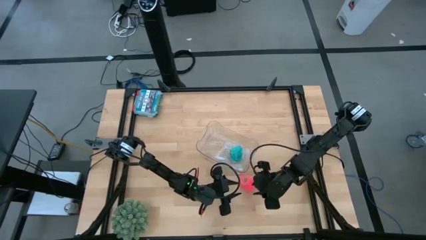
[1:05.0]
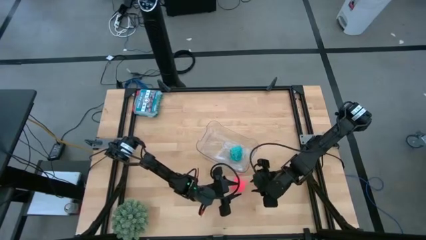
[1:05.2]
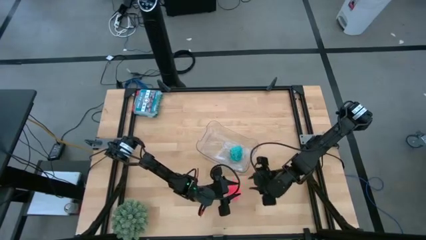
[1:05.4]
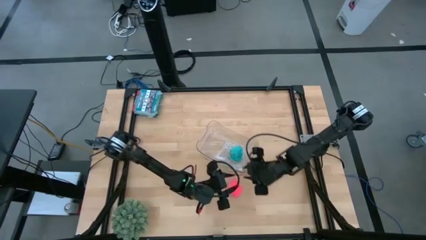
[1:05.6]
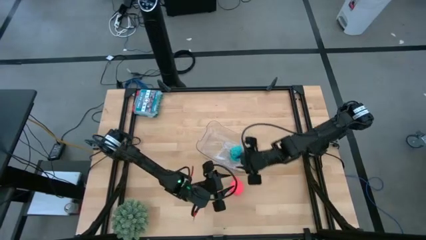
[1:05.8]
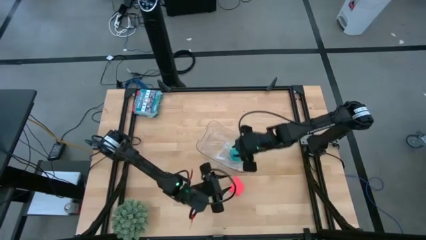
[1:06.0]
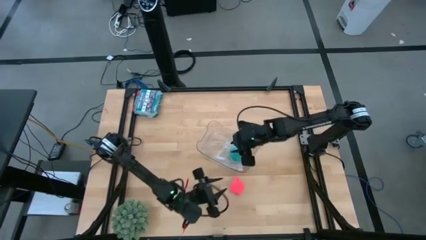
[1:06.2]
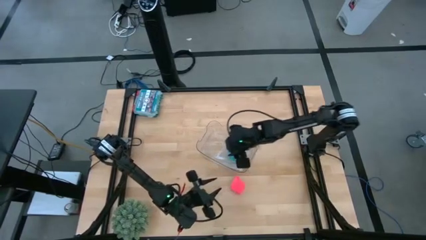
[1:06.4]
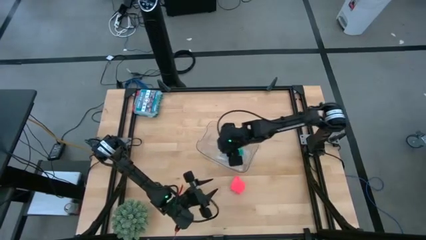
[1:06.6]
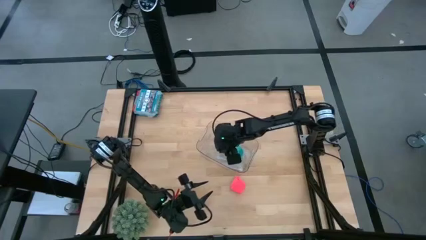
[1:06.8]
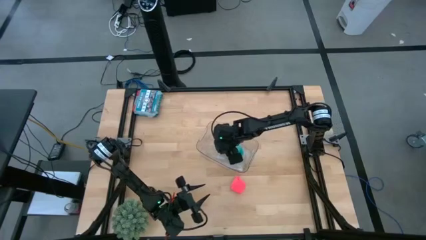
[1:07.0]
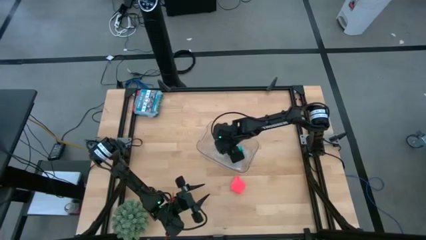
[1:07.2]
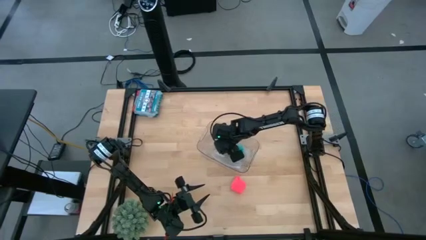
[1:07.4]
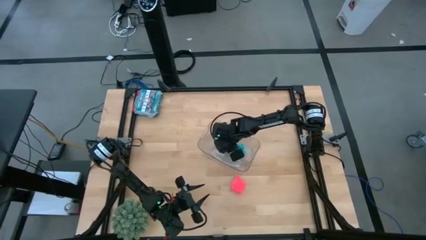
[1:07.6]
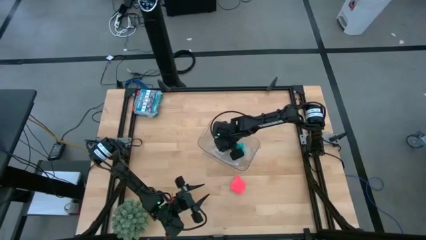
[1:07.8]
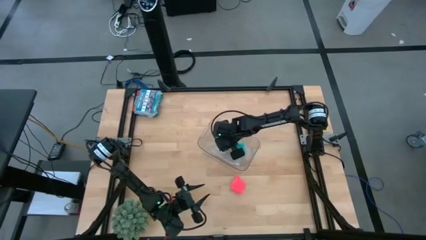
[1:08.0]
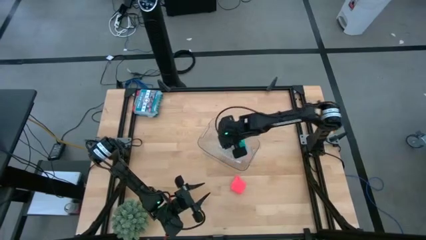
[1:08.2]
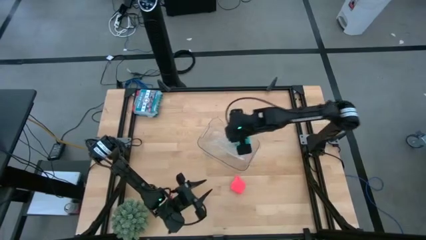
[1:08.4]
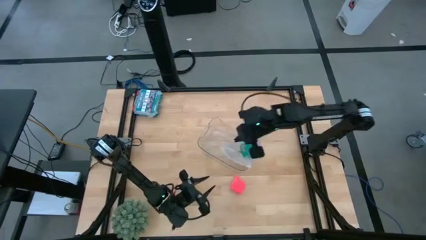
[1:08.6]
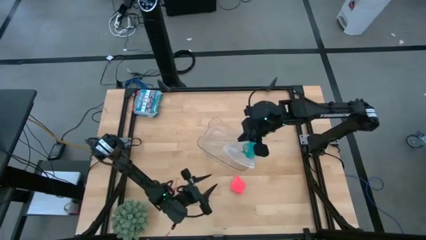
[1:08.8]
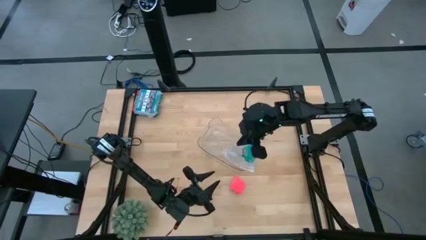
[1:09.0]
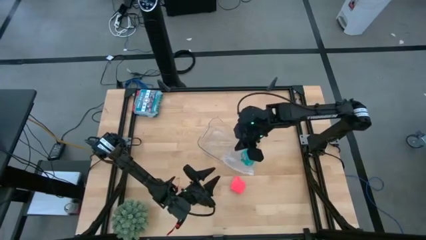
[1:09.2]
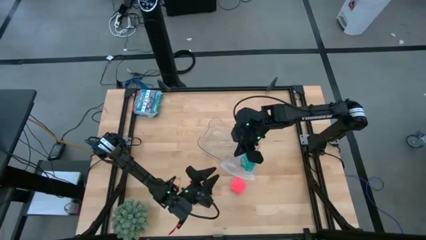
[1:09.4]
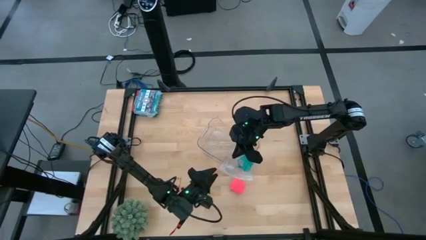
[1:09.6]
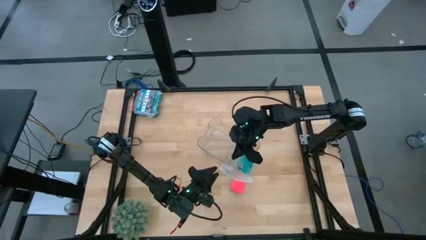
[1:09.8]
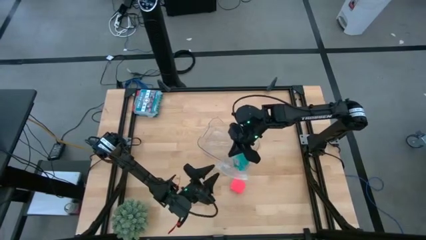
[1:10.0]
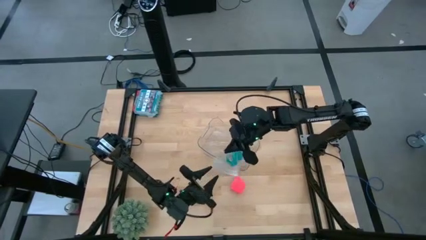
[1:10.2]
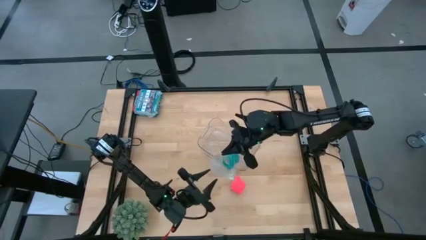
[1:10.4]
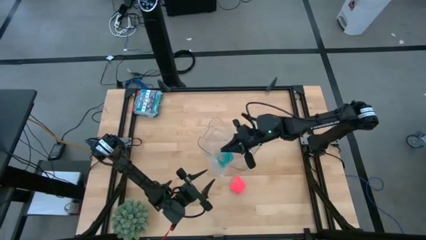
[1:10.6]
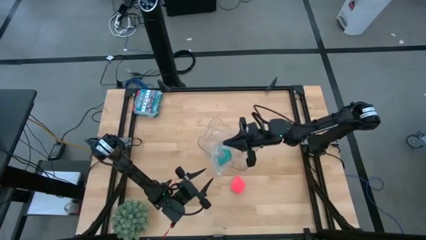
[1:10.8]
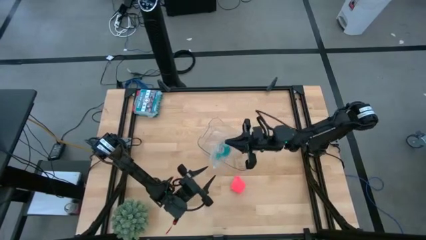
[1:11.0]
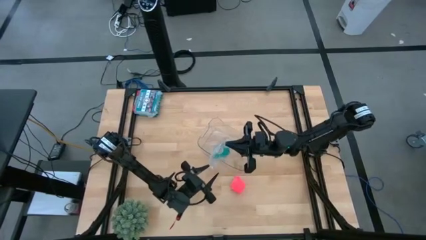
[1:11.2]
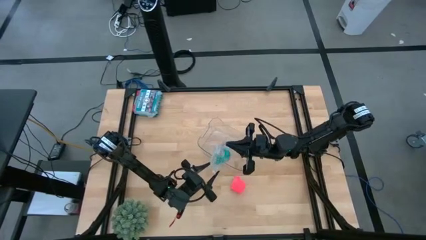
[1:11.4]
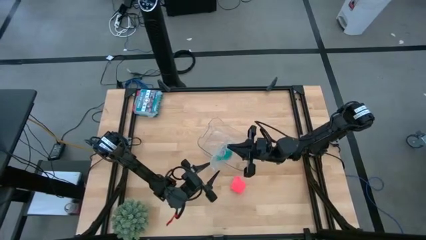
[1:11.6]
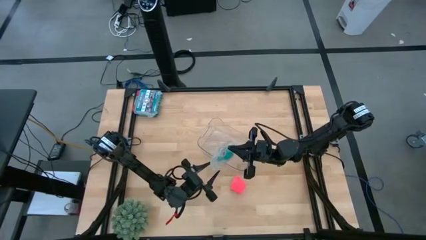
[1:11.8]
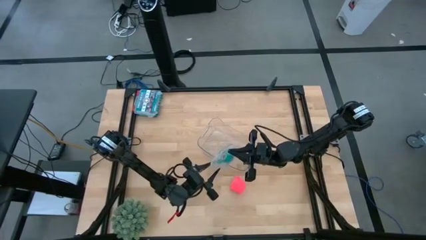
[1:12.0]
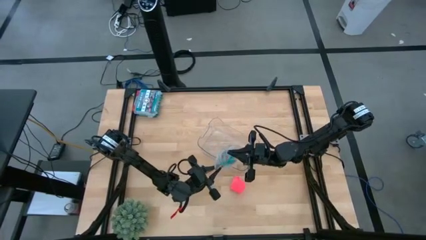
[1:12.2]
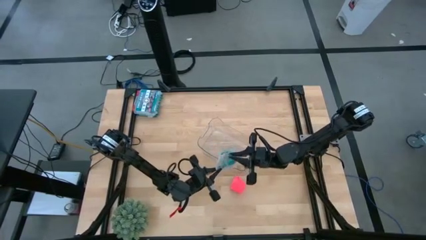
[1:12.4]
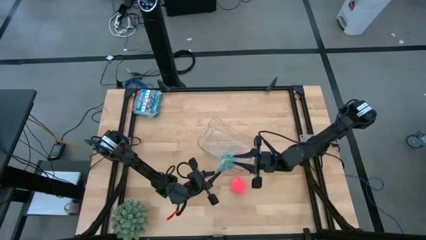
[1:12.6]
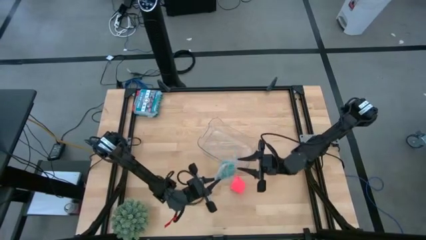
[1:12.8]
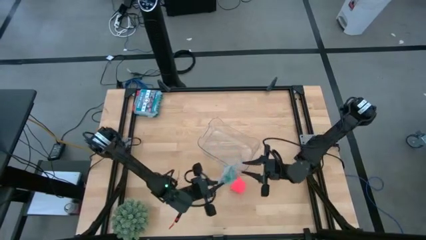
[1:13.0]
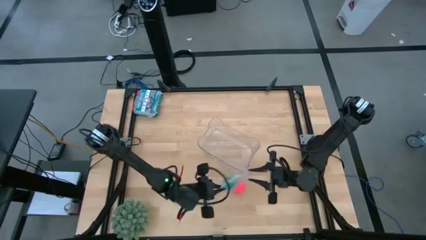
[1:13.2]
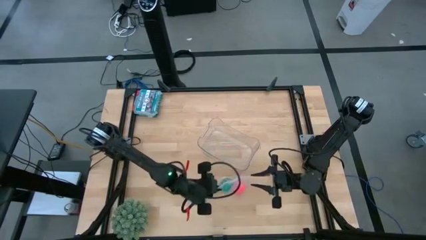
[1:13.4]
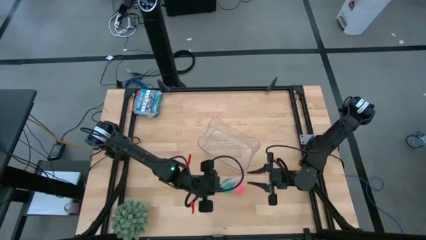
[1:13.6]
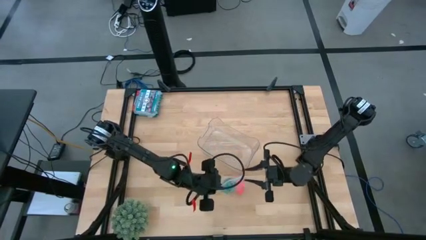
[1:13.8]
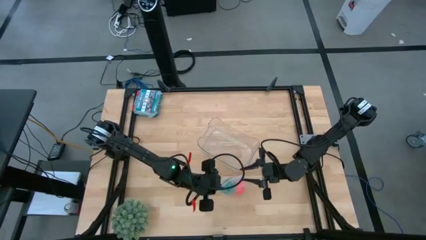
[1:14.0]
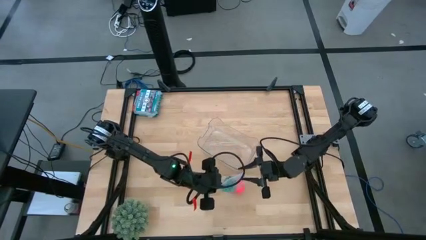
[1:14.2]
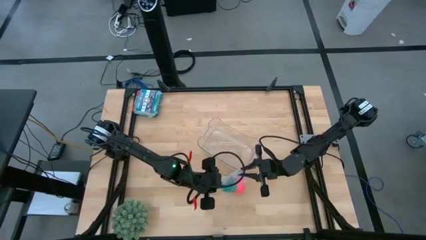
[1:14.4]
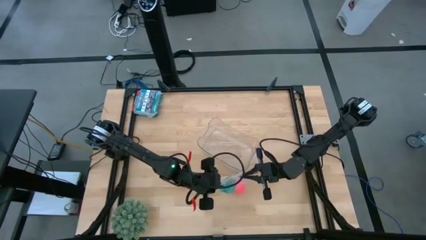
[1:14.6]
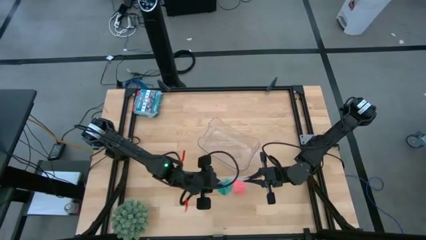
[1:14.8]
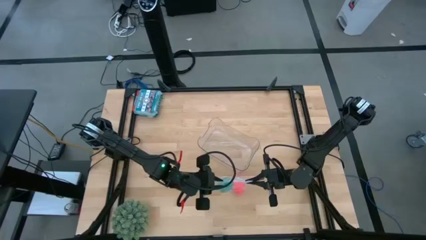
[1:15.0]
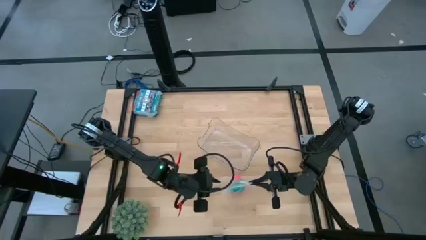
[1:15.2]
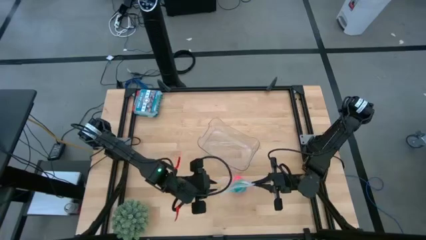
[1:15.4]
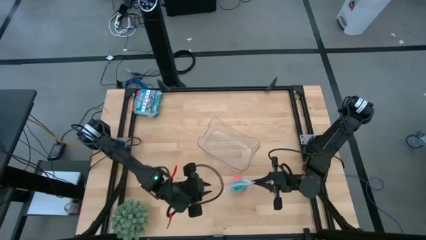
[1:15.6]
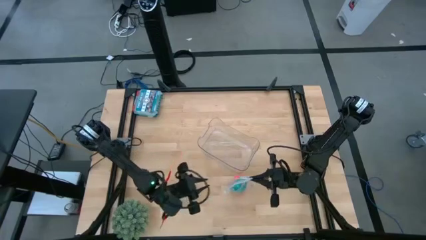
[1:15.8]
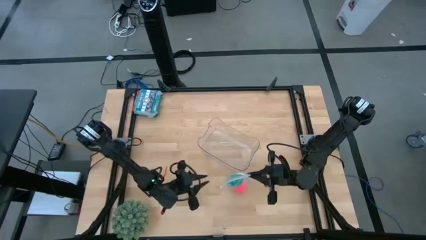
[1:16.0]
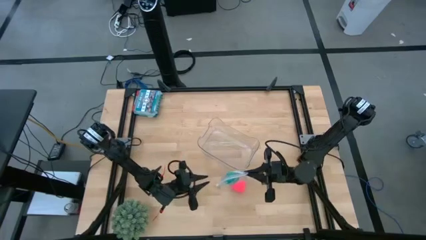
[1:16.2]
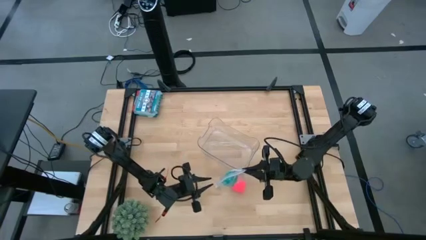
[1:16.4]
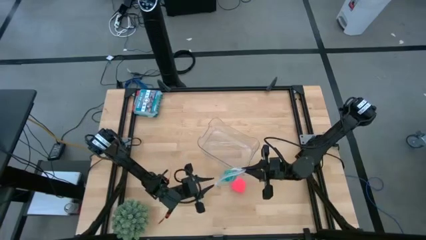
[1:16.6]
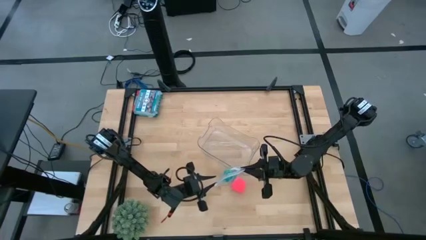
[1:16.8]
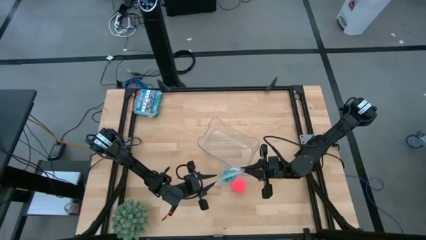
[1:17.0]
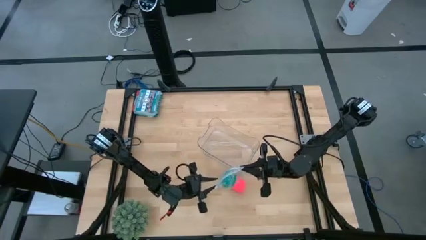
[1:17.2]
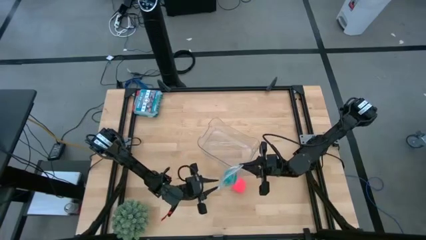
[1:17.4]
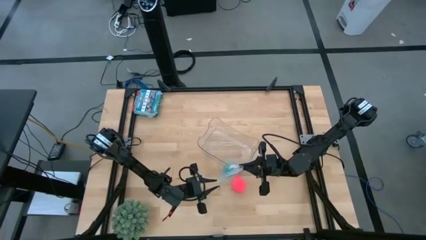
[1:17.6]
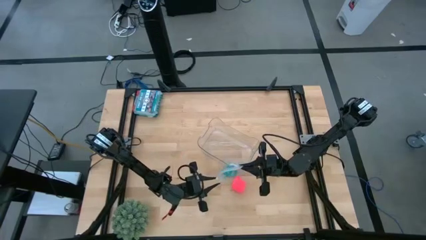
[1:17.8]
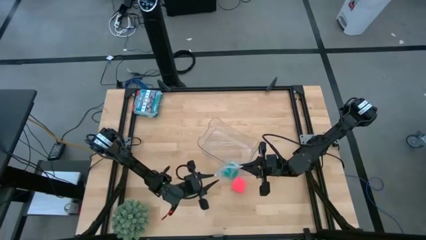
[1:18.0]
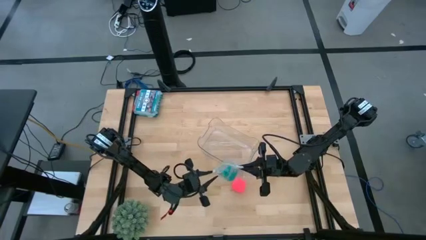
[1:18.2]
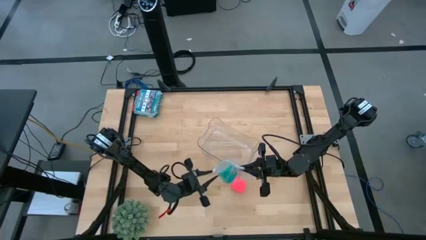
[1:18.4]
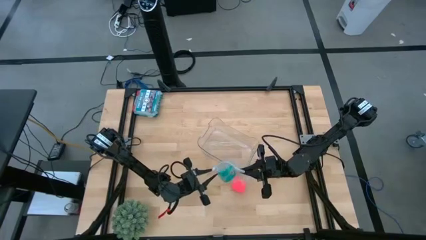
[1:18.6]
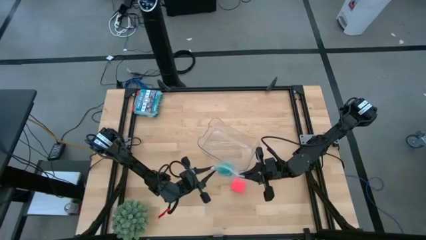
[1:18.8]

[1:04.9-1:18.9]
Task: Roll bandage
Open the transparent zip bag

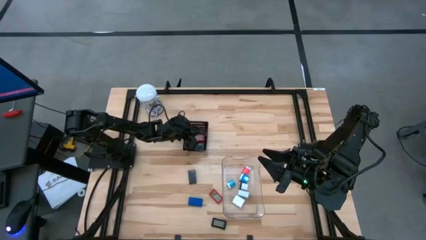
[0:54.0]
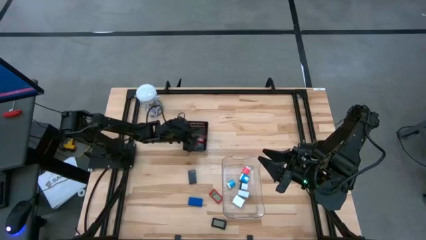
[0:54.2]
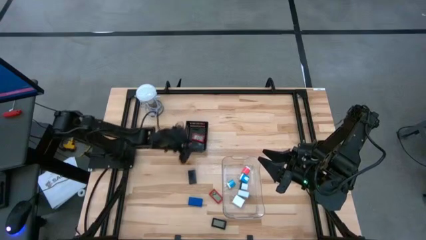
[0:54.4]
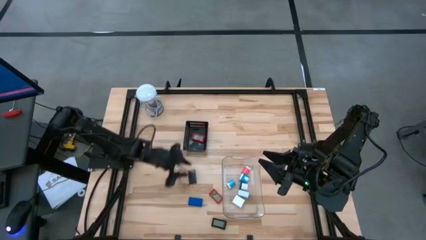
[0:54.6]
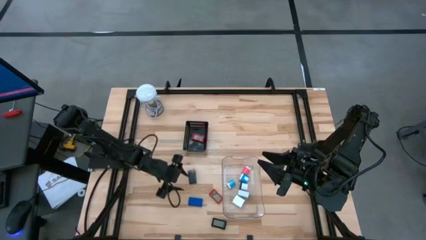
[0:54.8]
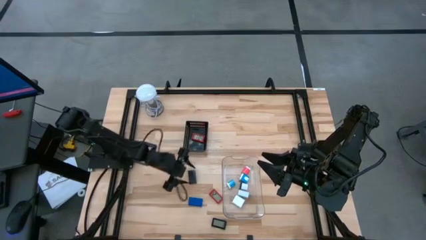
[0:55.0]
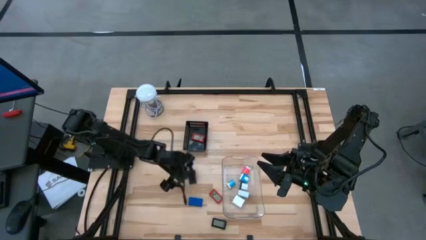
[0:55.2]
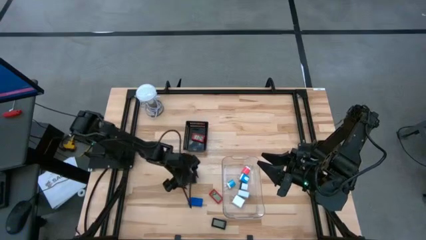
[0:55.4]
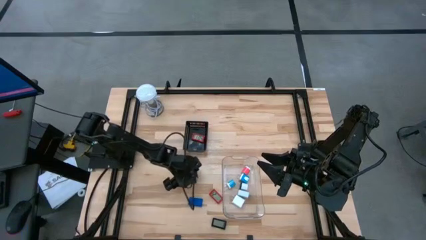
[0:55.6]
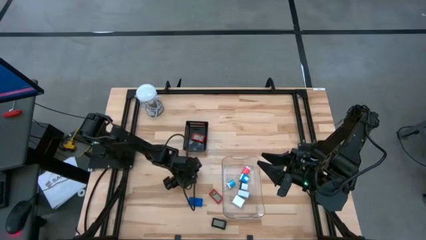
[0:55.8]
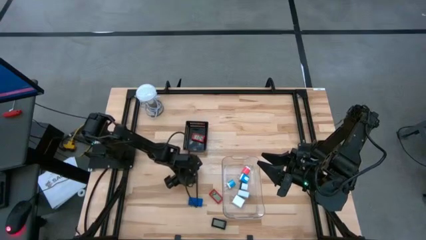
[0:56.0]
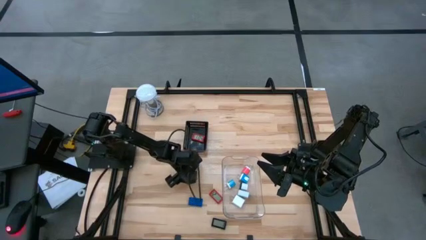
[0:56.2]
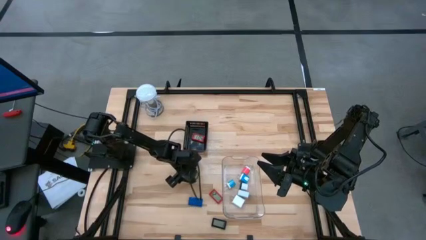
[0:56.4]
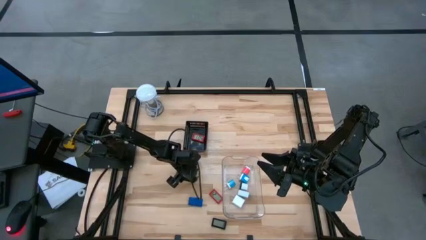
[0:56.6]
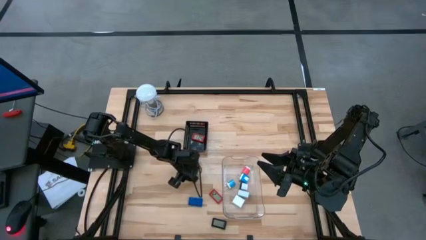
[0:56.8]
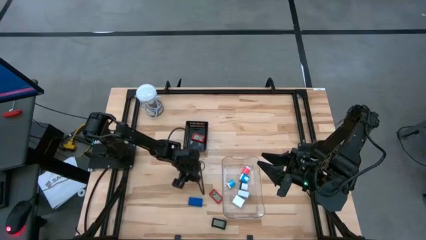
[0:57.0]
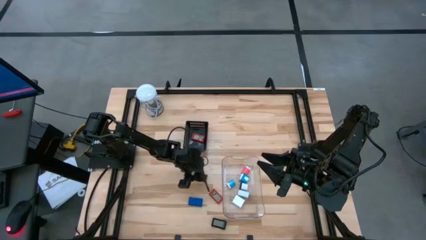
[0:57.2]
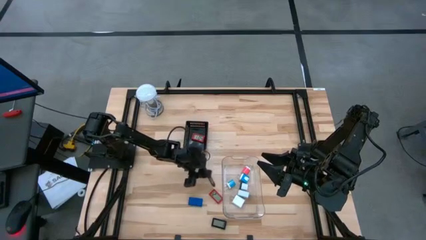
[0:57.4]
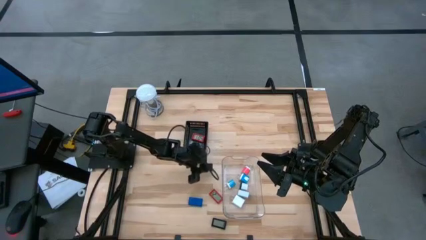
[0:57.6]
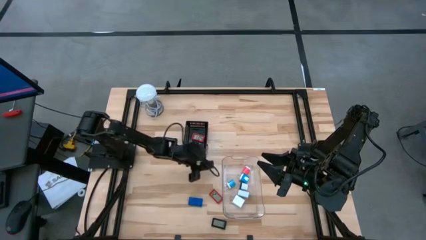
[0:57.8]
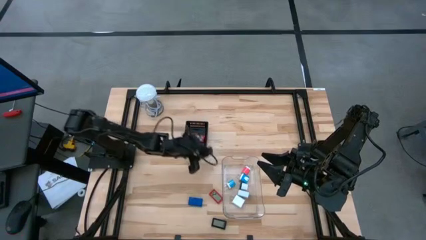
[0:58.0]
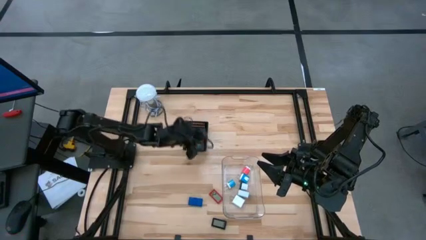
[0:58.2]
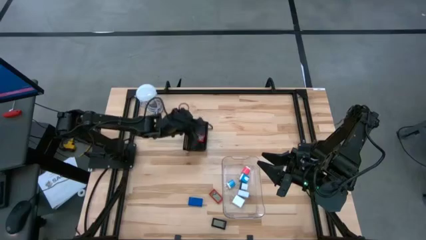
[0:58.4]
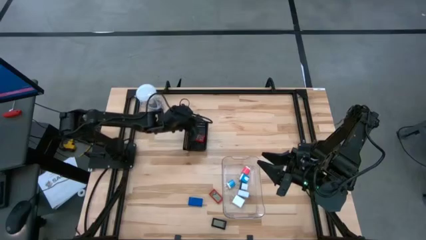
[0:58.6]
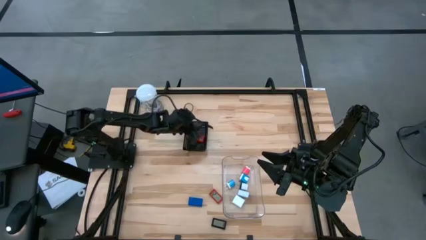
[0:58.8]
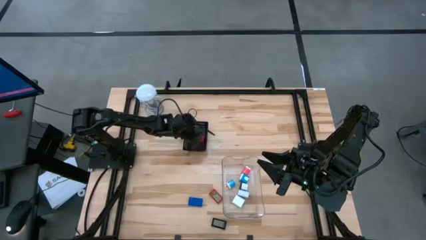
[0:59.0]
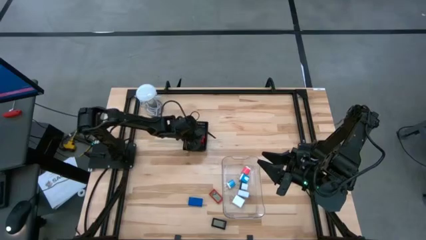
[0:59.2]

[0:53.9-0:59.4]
Task: Pick & Place Office items
Put the top black digital clock into the black bin
